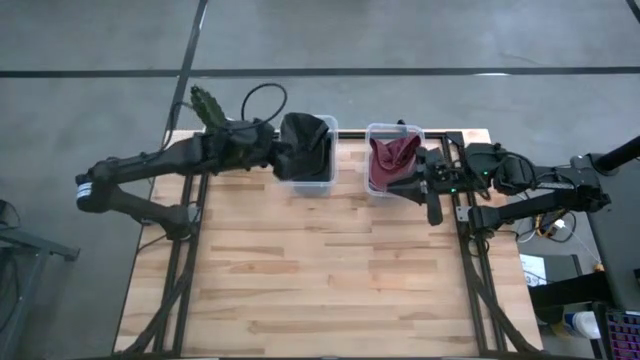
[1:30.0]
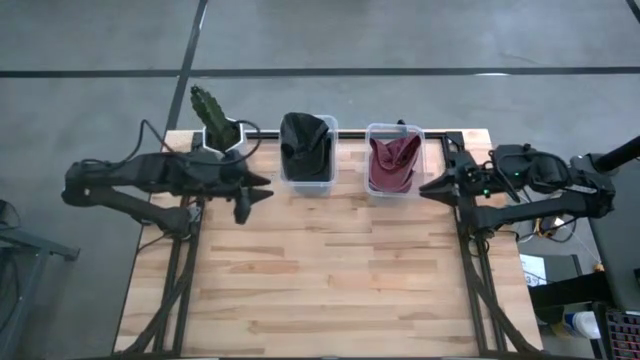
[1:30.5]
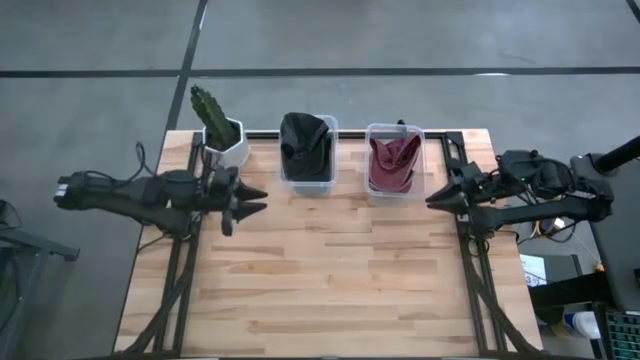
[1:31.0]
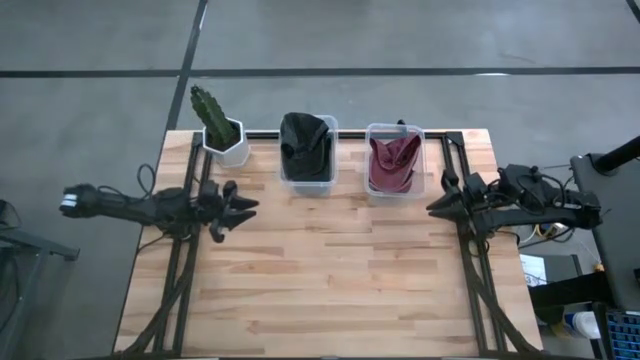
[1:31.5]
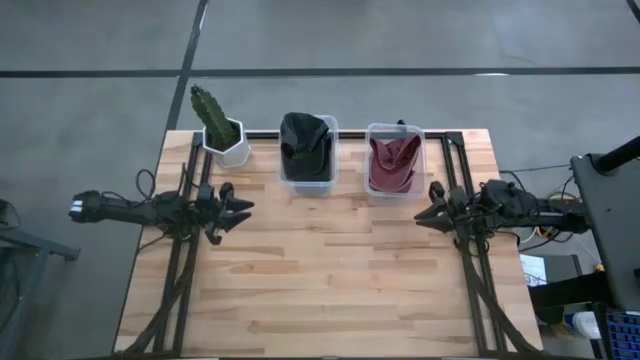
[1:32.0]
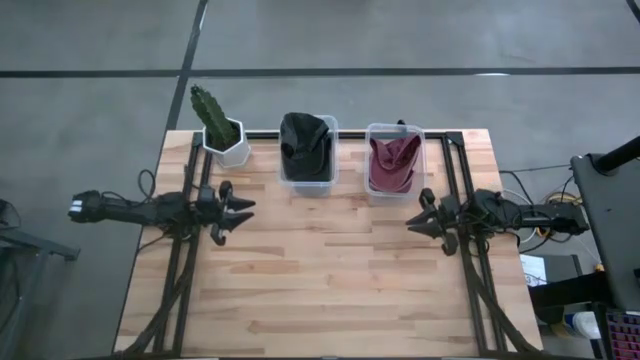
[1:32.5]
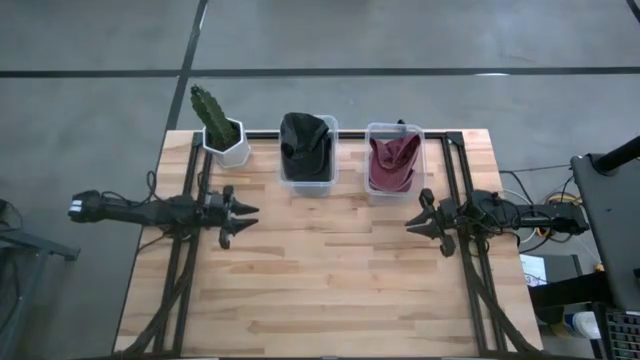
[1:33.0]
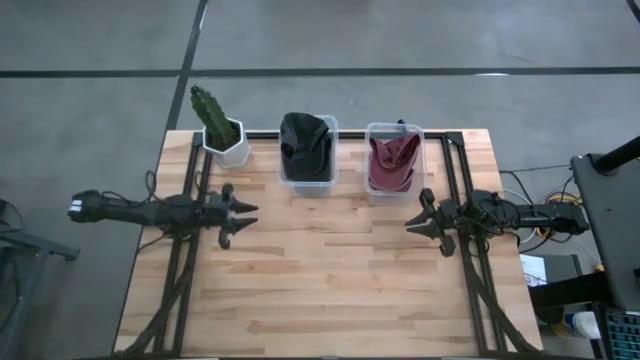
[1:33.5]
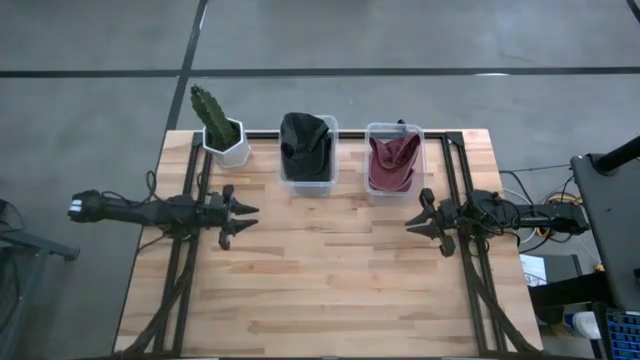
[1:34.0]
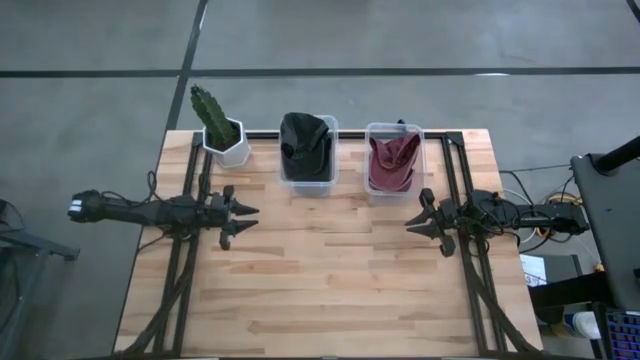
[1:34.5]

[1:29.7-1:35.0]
Task: Pick & Place hat
Return to Home Position

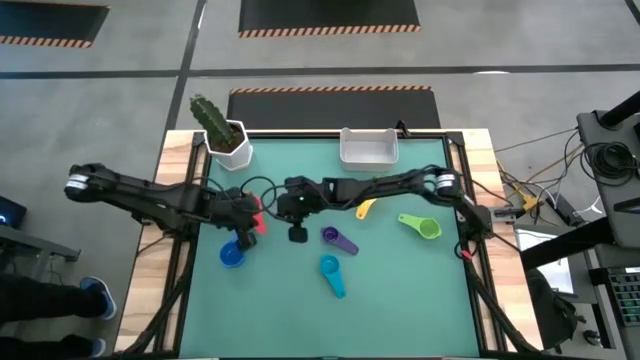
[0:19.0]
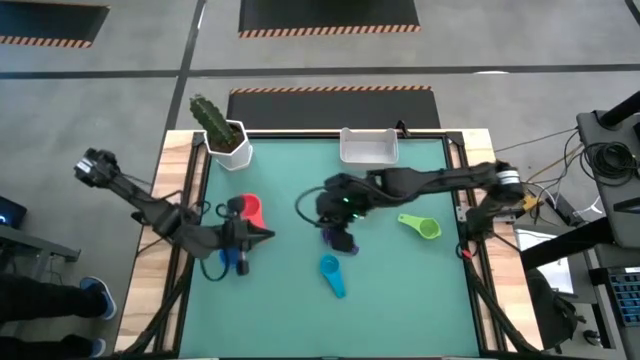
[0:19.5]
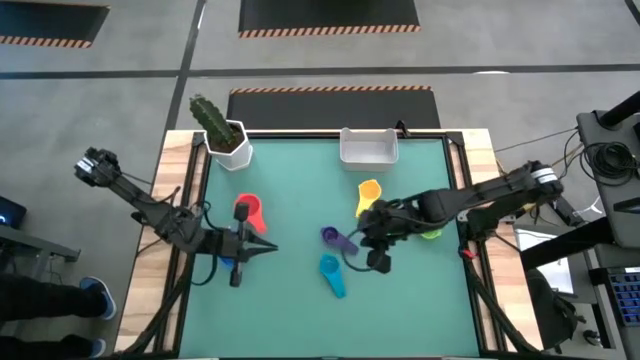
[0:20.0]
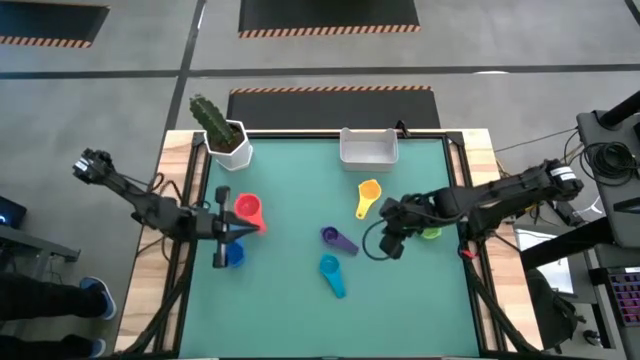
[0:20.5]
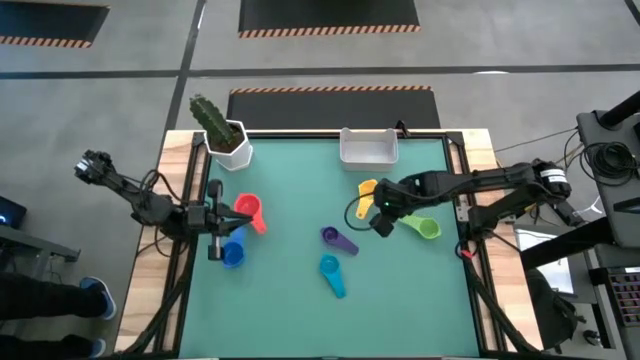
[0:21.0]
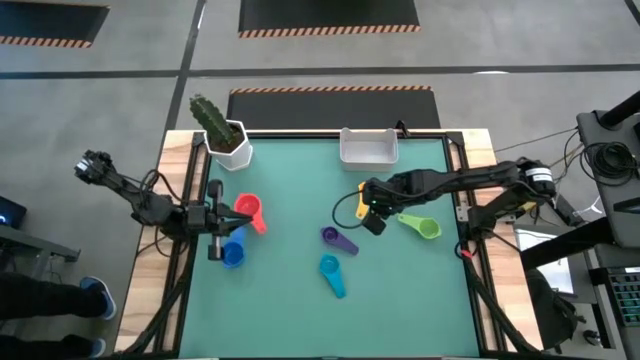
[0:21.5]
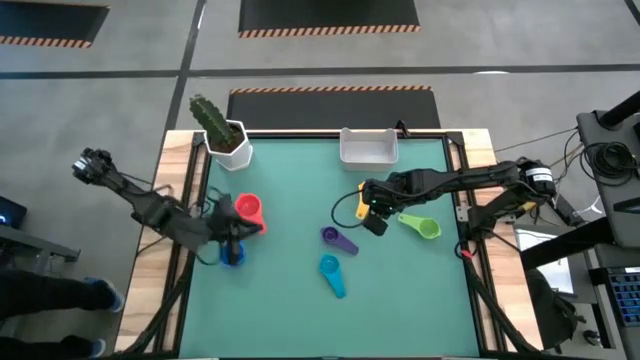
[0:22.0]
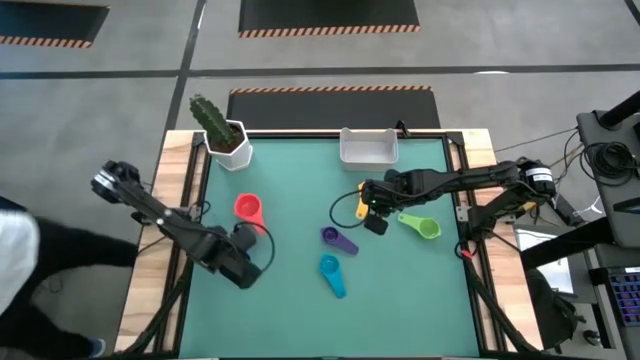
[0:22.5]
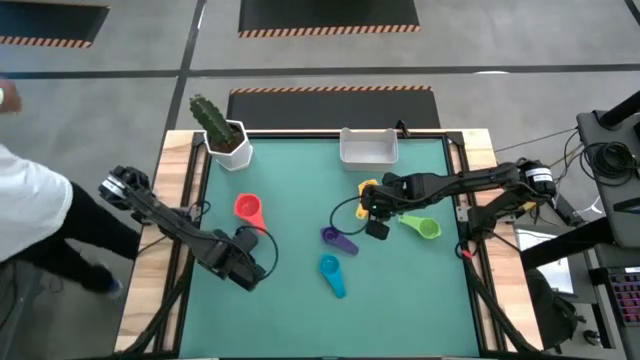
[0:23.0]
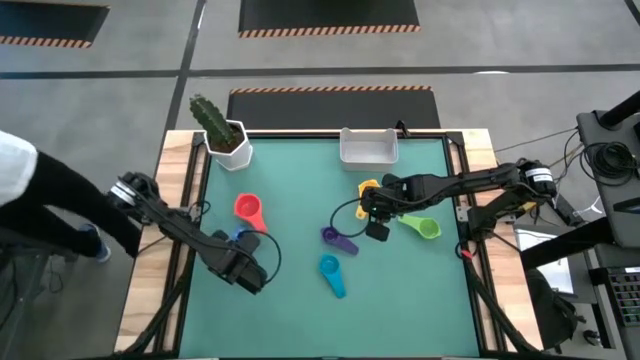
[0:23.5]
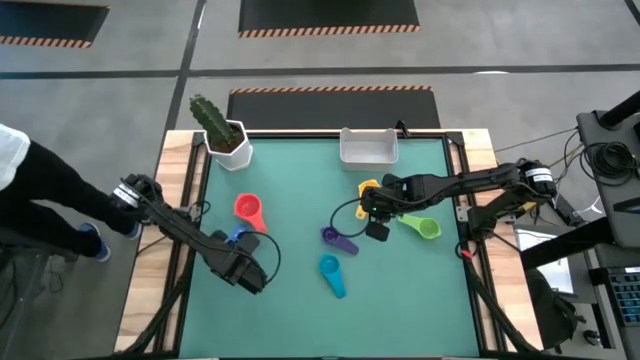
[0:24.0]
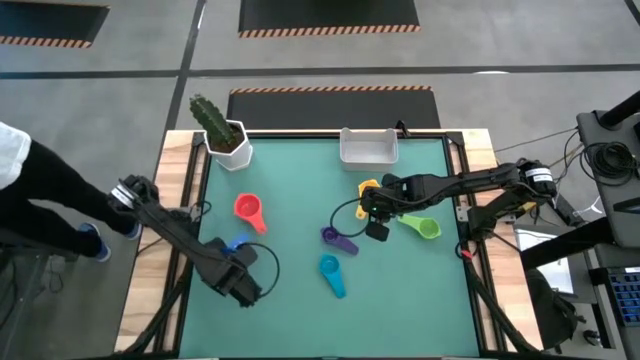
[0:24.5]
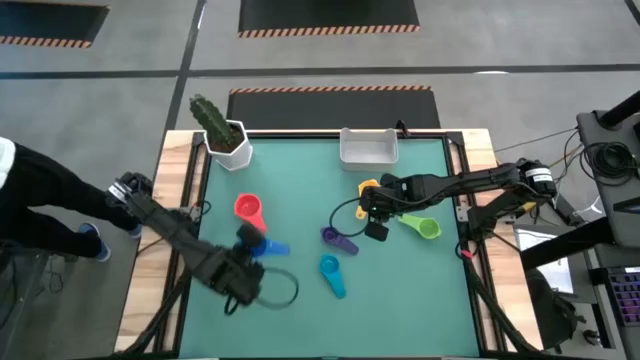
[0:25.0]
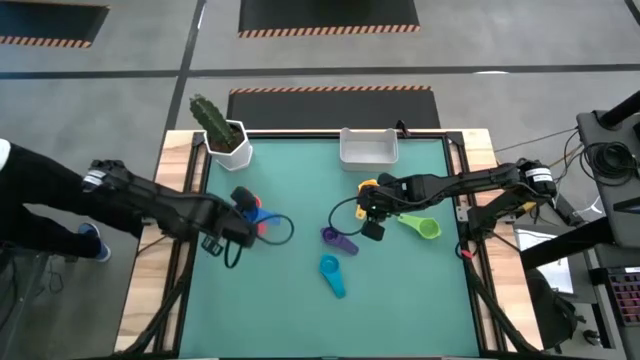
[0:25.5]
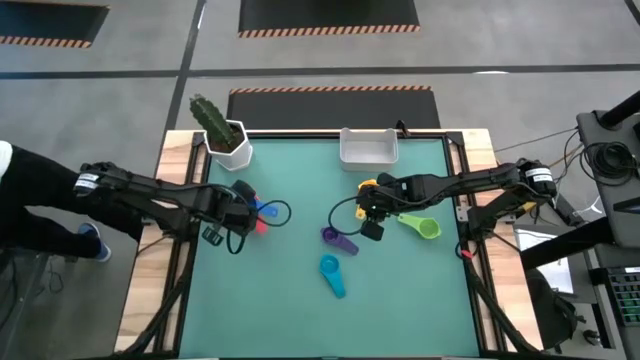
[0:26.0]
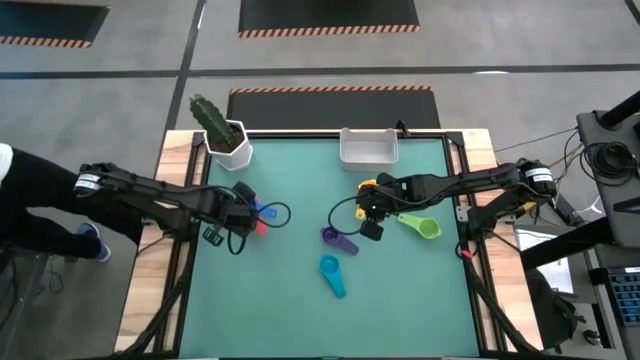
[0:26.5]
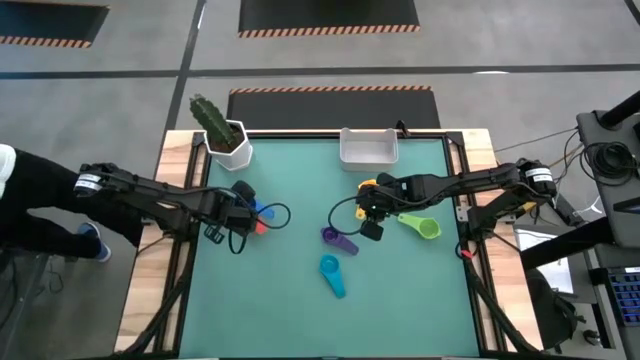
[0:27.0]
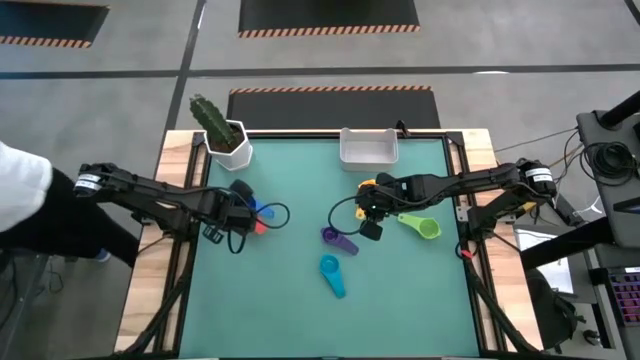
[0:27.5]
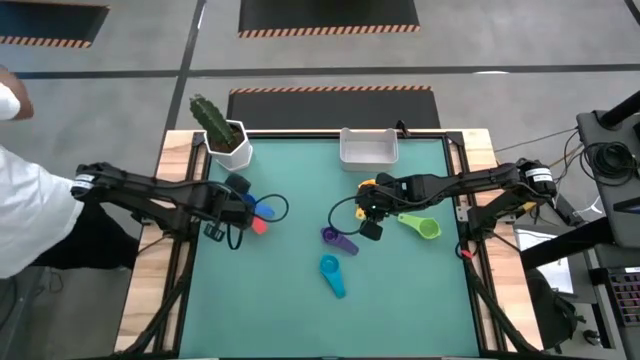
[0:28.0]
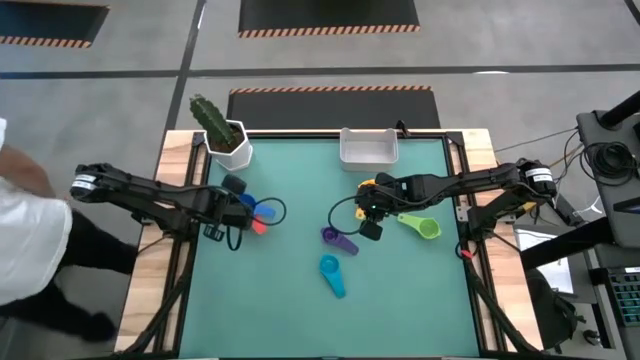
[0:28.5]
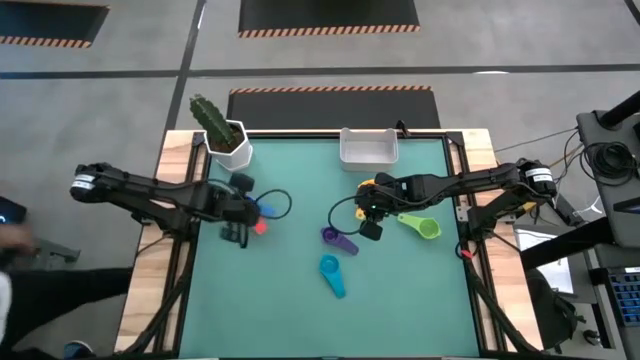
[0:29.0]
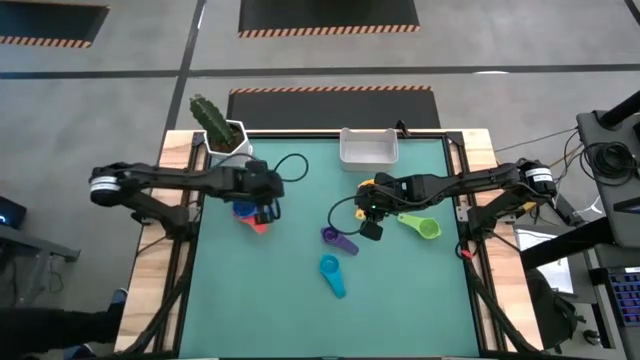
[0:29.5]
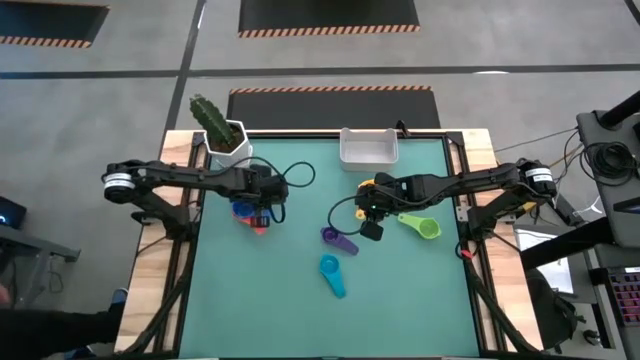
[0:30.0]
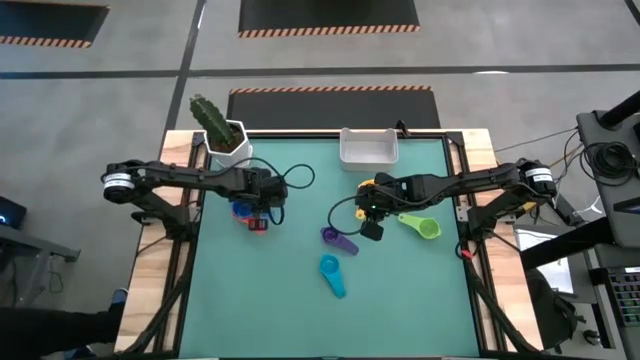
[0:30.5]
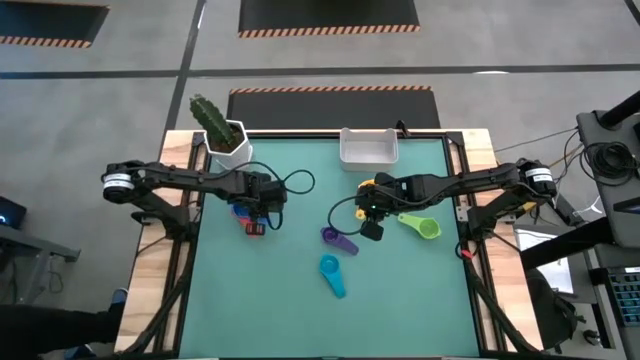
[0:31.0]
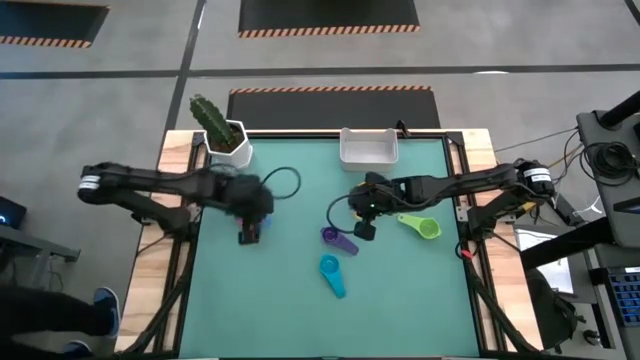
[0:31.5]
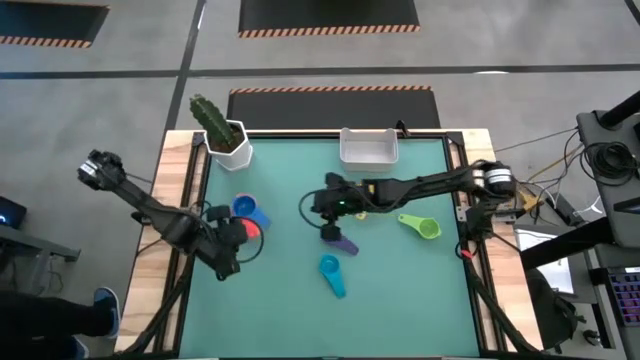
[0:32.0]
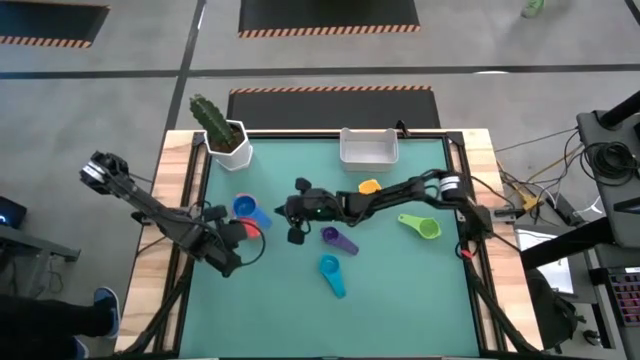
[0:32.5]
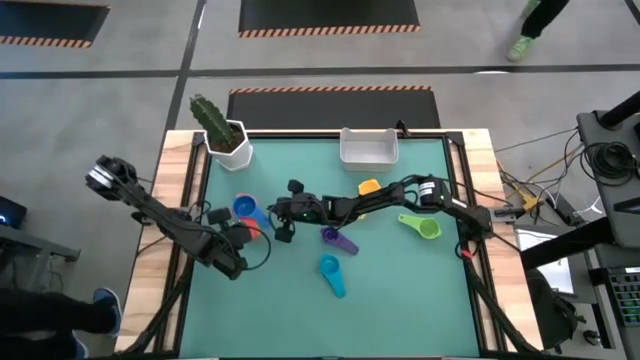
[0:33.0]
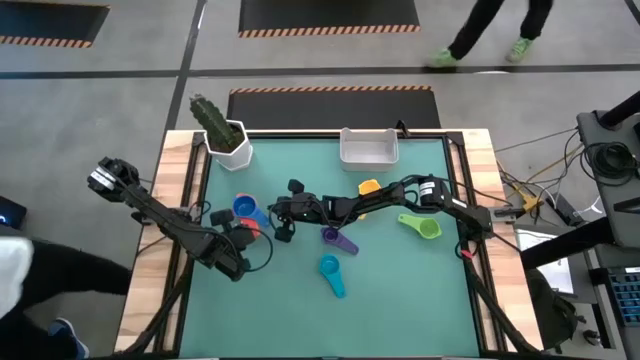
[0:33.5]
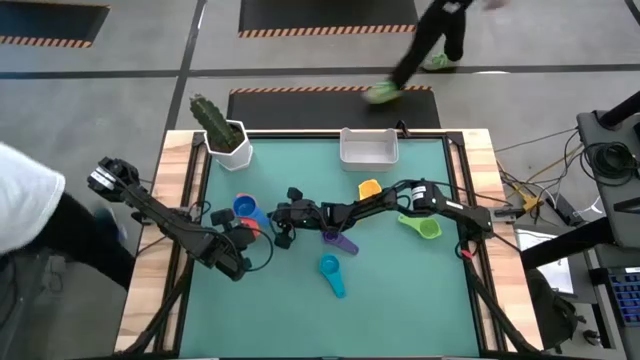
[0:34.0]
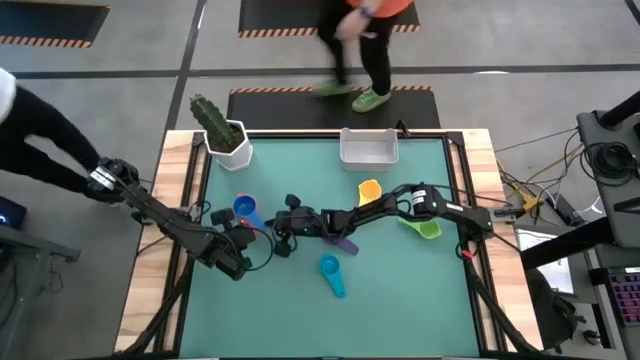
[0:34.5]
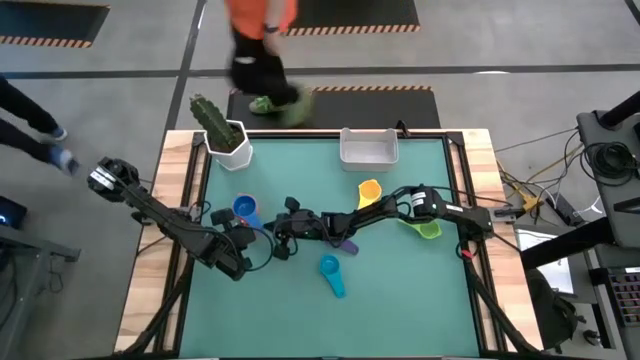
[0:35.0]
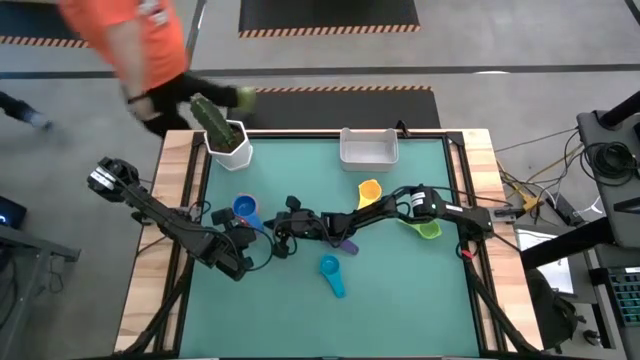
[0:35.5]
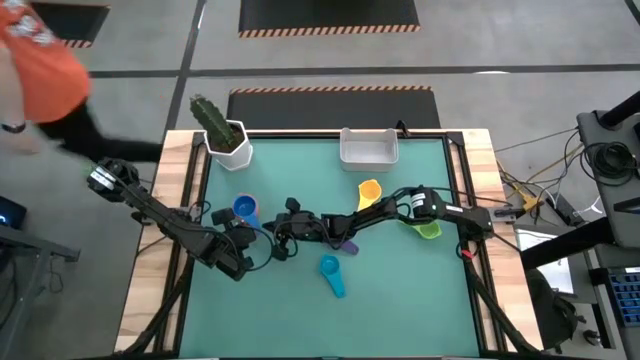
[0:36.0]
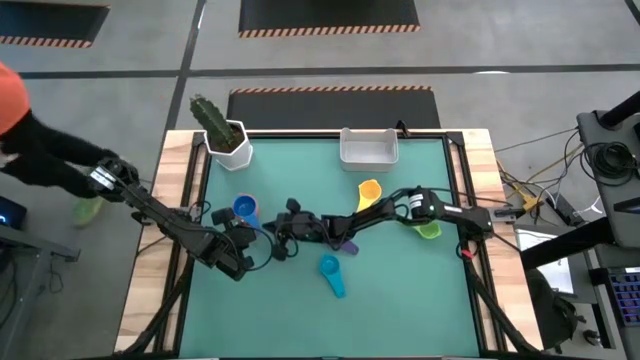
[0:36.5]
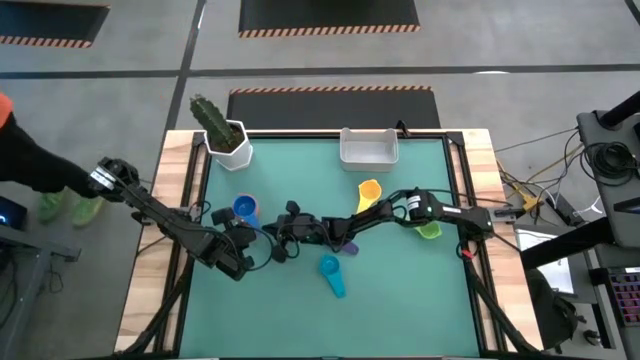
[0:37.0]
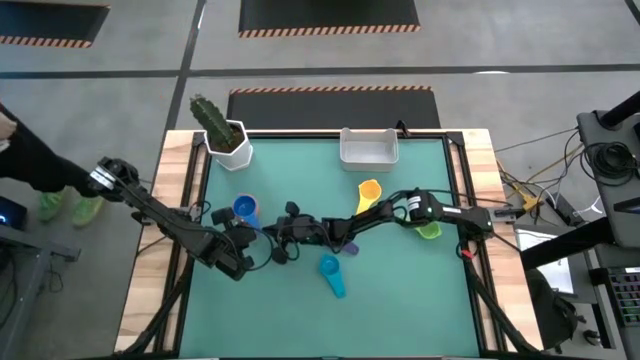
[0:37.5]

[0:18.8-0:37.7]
Task: Nest measuring cups in basket
Stack the blue measuring cup on top of the red measuring cup
